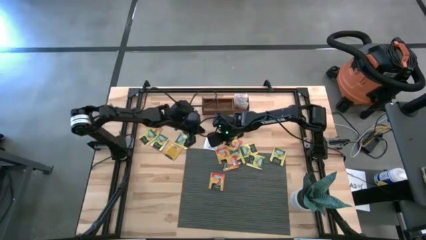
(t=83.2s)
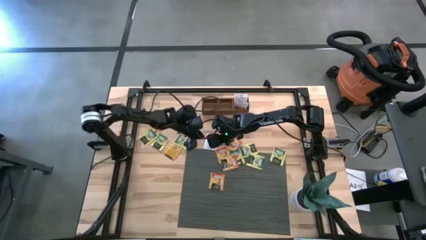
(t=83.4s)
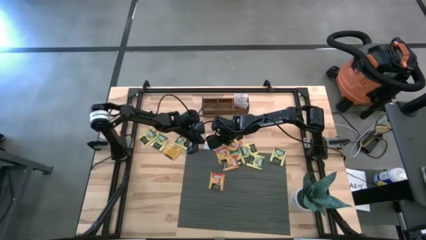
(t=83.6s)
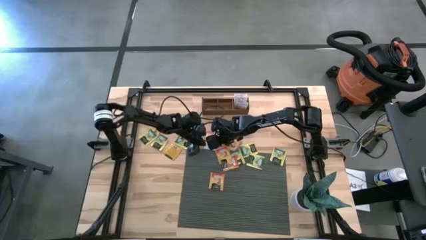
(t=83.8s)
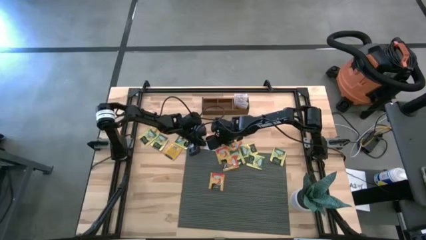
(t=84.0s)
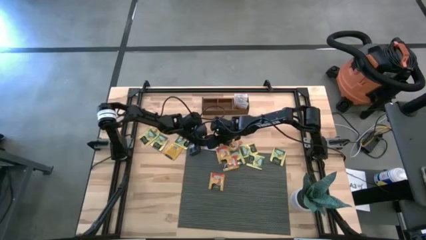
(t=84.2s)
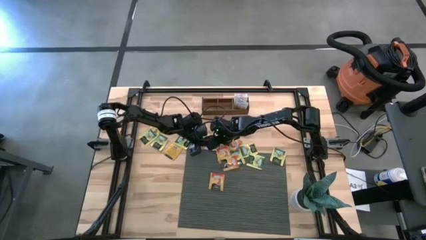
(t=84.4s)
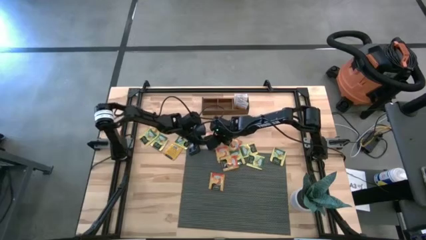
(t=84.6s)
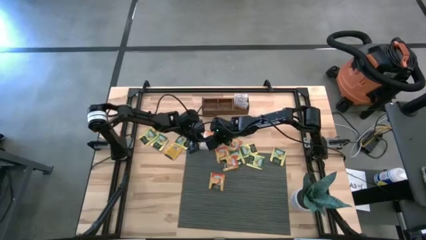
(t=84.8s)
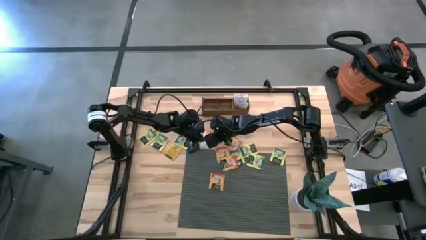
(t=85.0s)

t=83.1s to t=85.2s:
Task: Pick & Place Tea
Put the white tea bag into the right section of the wooden organizer

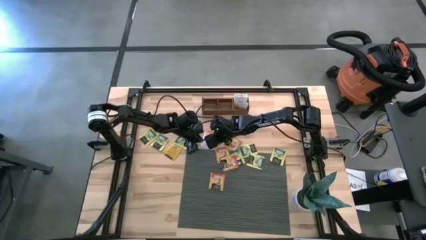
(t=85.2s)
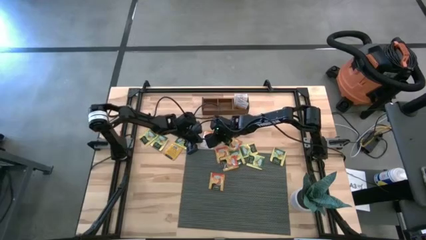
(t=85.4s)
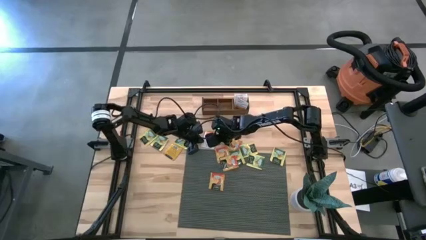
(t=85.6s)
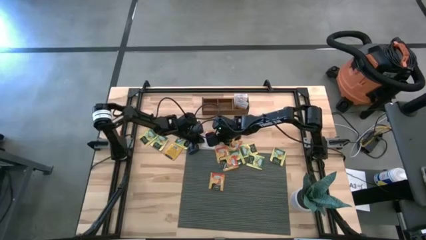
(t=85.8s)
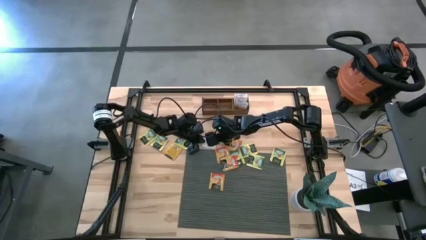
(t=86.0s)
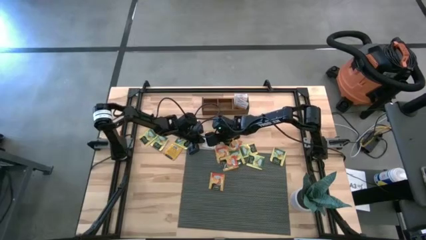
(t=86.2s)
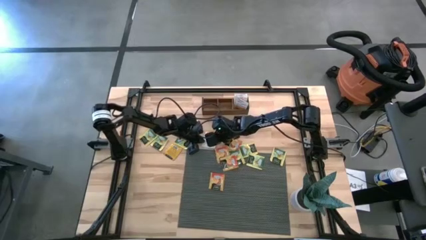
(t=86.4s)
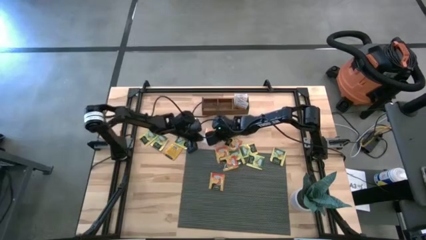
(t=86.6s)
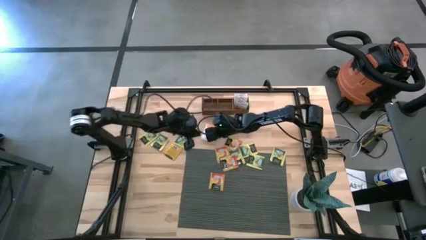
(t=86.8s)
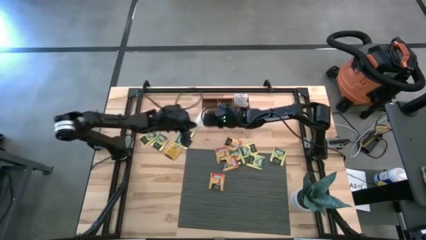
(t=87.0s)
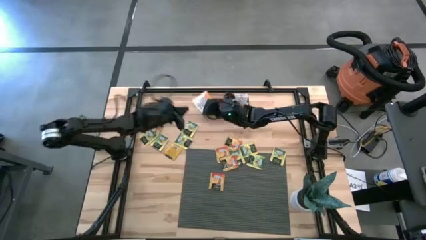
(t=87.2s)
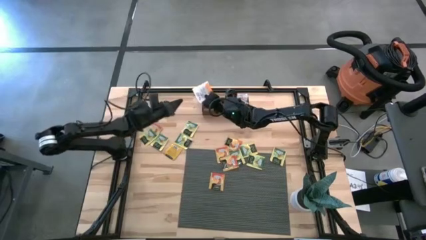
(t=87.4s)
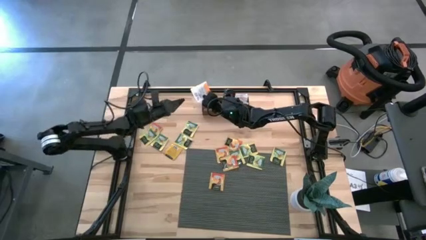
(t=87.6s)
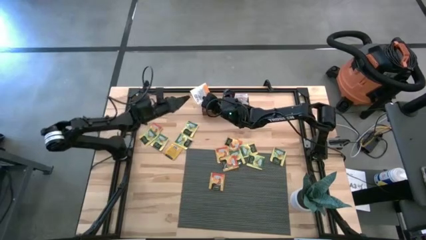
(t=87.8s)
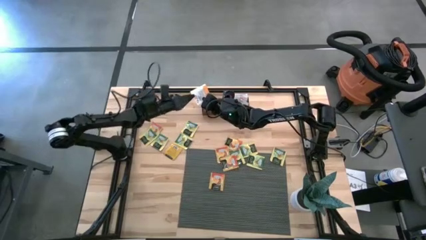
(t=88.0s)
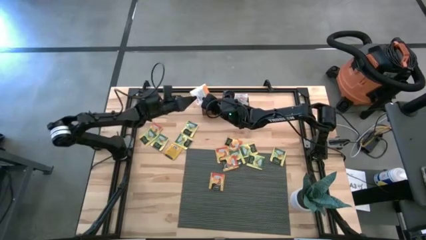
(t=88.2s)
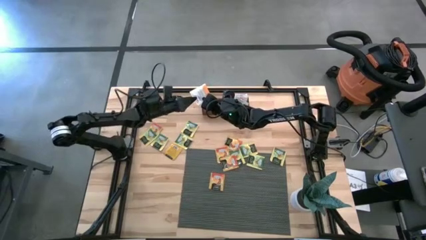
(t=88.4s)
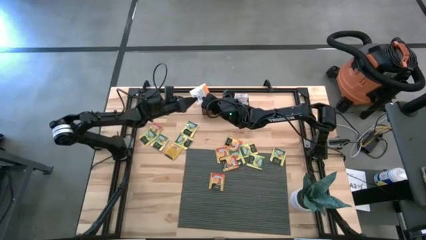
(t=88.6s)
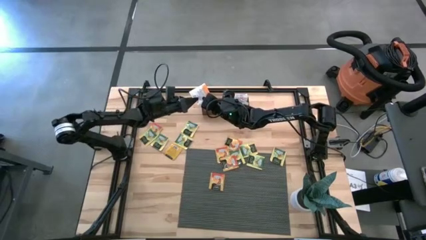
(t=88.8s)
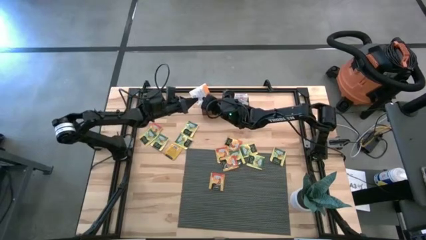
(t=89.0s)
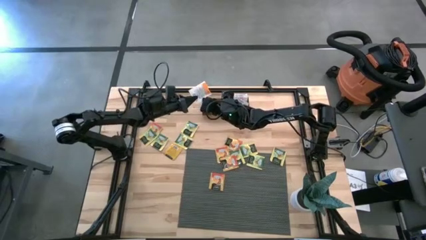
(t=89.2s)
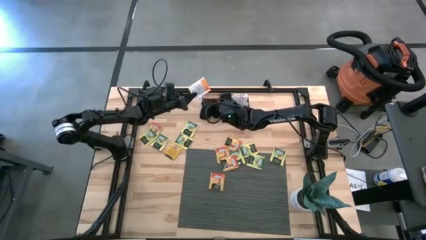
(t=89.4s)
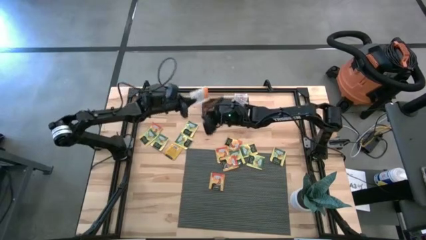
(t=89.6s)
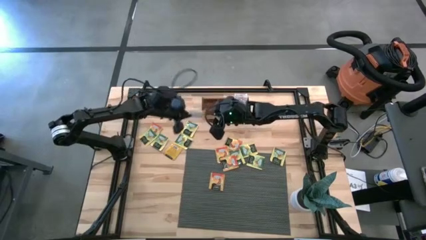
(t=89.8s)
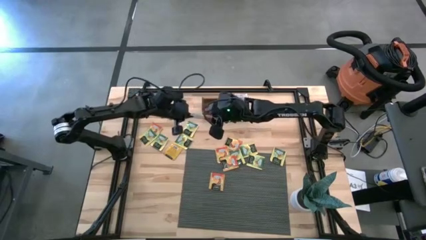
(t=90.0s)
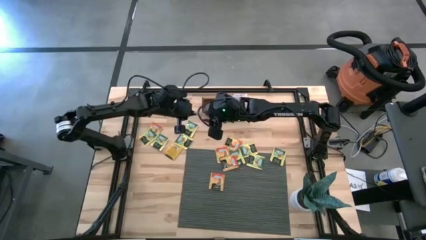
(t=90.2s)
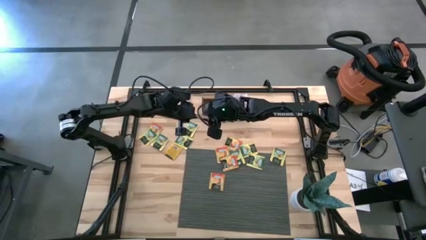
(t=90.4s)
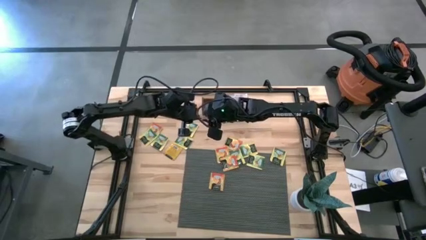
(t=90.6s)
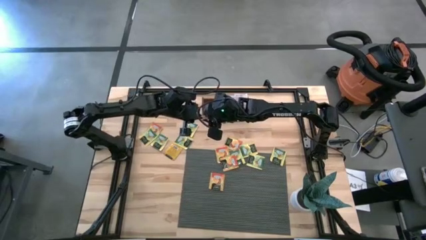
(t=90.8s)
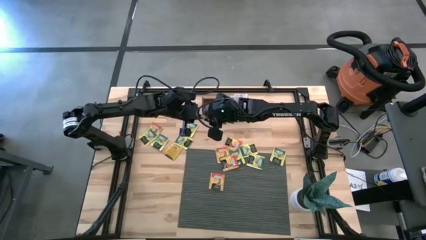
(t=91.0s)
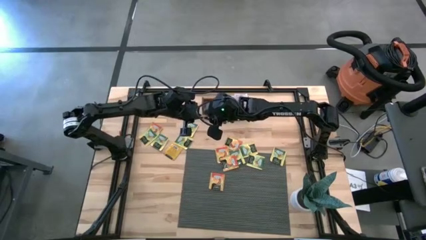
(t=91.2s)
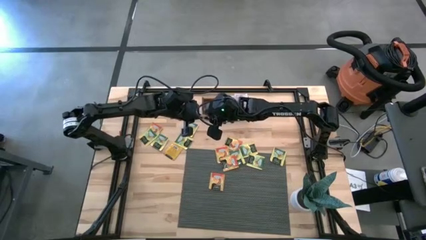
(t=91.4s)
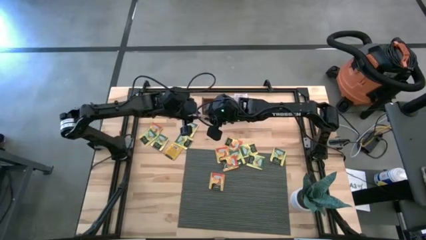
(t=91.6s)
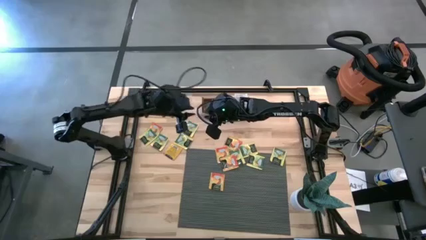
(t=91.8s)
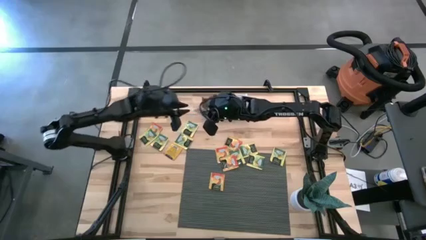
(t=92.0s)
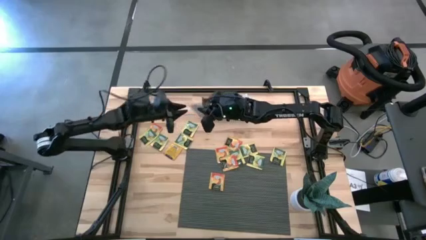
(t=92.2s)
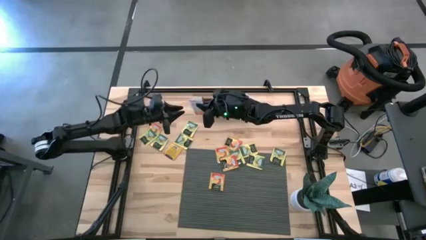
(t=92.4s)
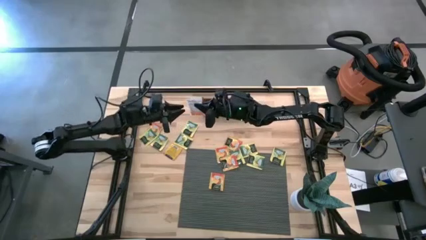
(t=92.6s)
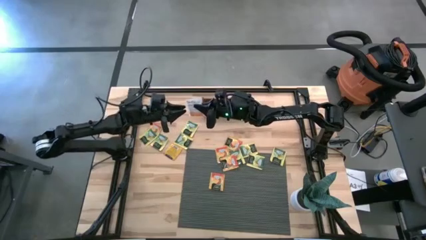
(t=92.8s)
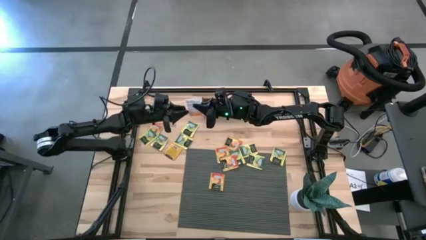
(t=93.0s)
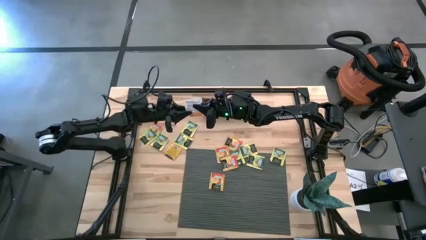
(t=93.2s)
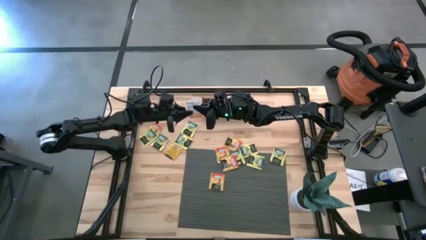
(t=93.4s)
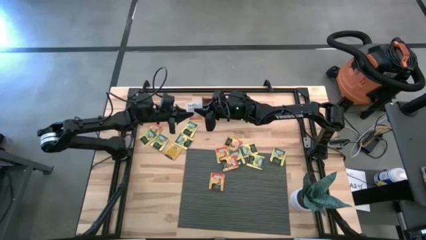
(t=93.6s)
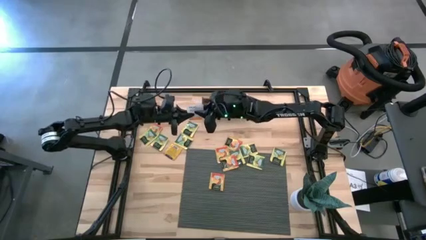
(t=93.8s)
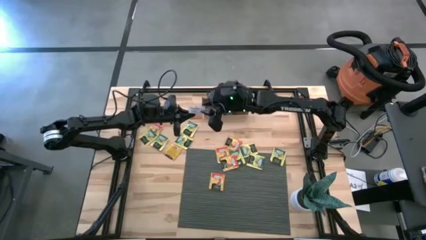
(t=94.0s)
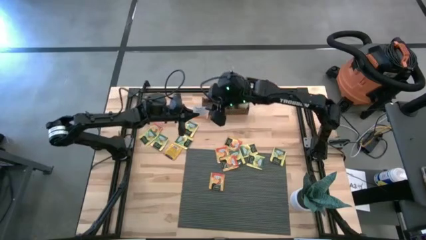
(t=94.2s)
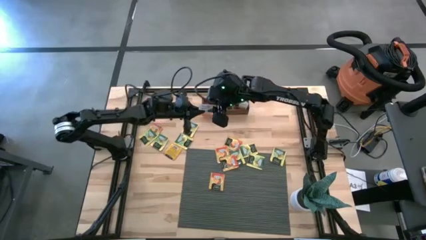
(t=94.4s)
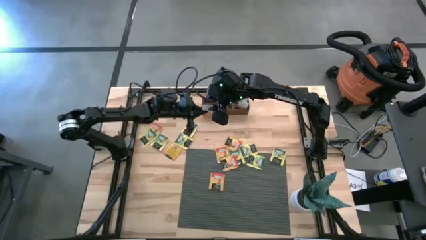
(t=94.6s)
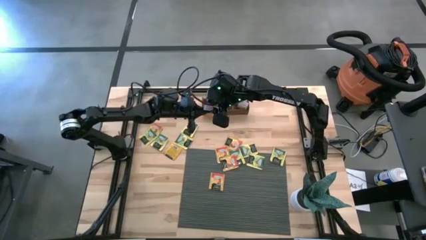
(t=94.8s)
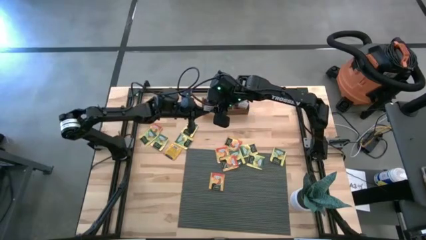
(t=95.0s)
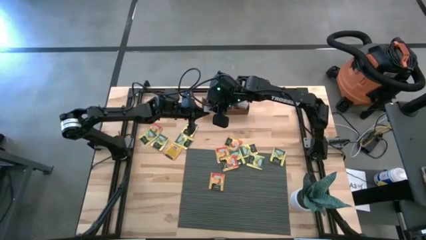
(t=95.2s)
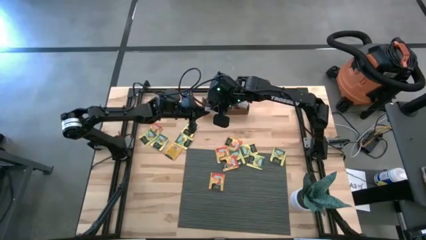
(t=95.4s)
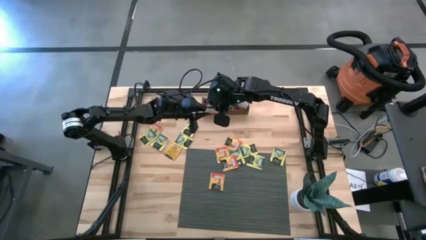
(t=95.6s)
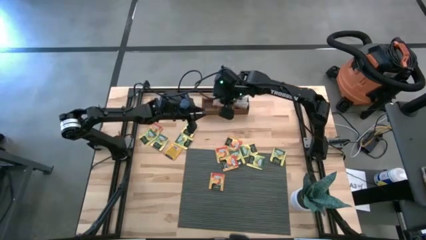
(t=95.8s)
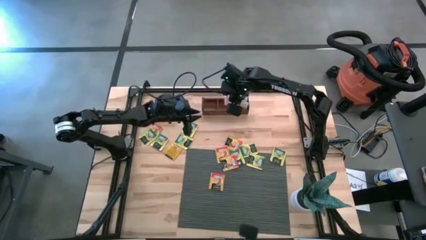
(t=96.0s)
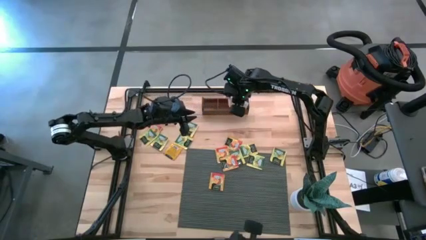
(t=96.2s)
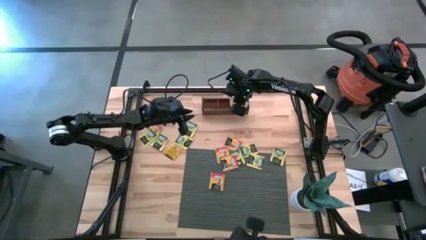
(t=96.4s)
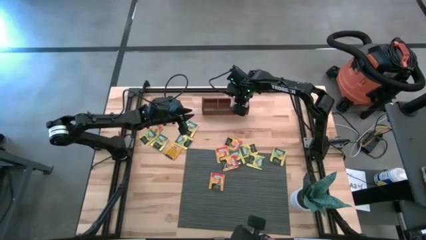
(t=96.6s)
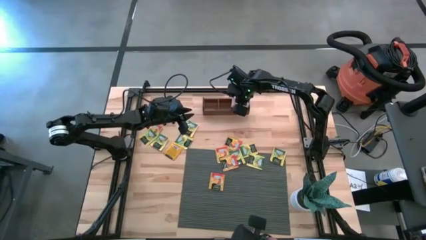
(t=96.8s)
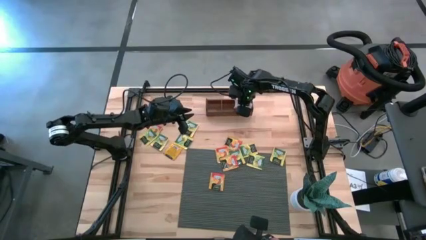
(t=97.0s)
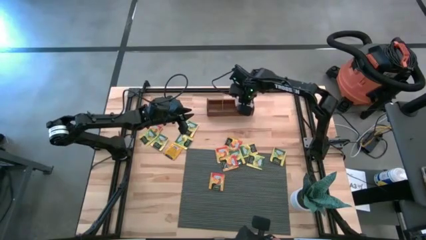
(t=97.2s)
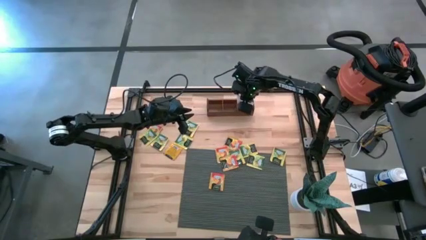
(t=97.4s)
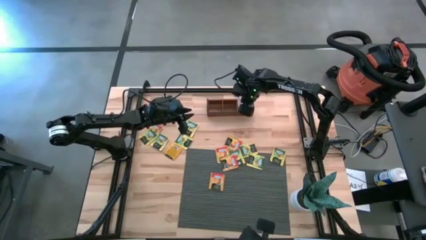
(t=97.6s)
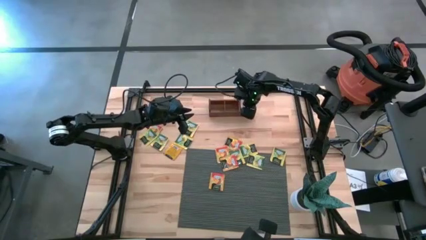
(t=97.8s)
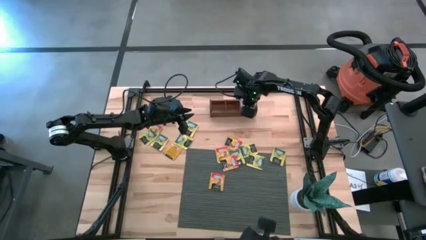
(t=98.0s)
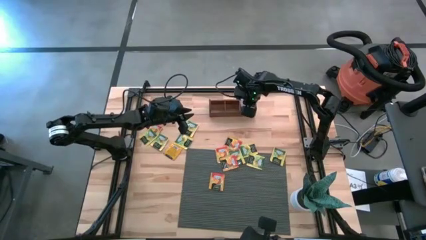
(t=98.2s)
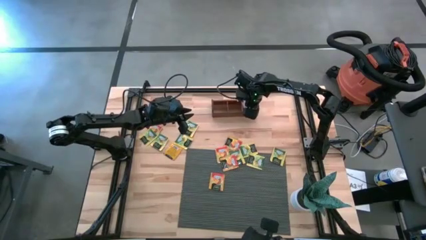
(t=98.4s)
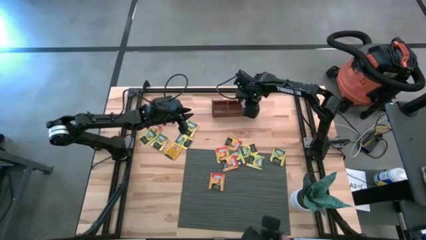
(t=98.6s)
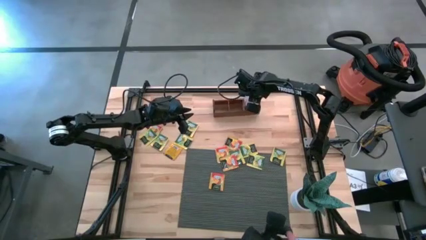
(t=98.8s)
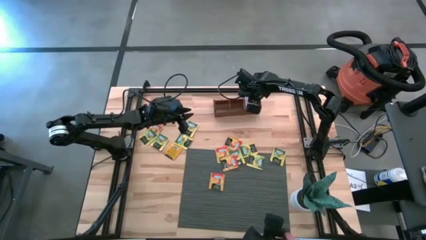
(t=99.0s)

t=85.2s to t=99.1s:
Put the white tea bag into the right section of the wooden organizer

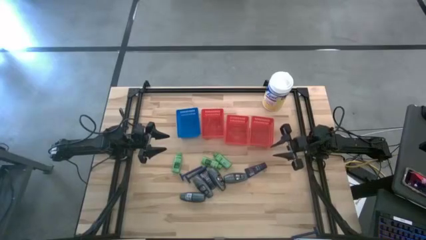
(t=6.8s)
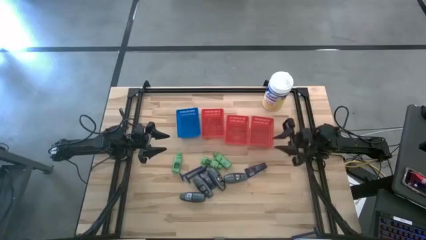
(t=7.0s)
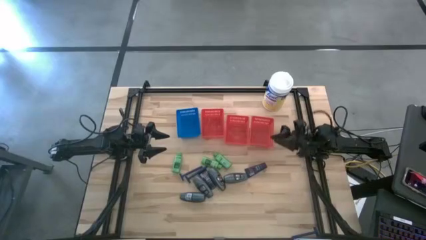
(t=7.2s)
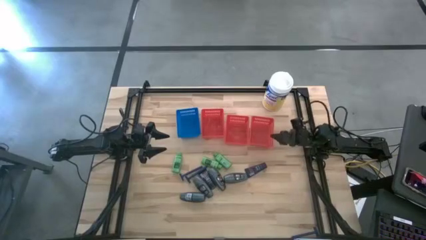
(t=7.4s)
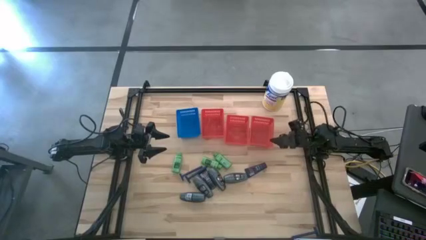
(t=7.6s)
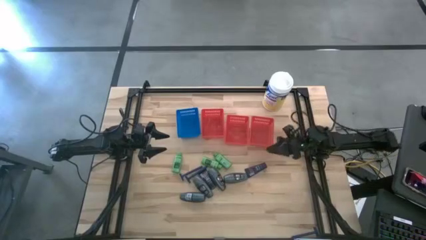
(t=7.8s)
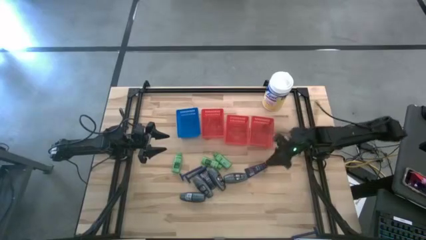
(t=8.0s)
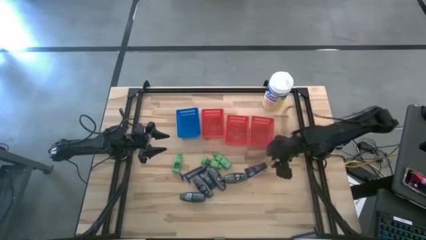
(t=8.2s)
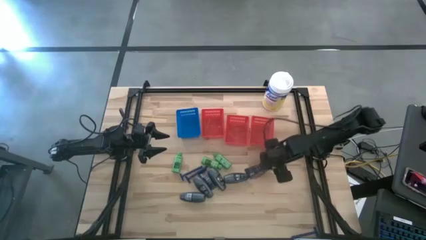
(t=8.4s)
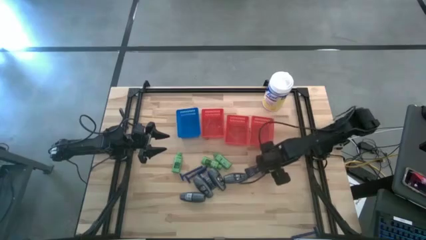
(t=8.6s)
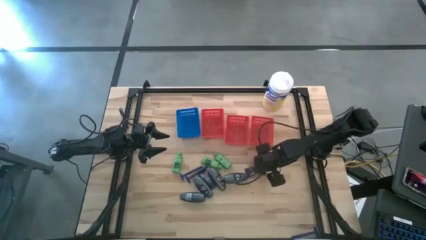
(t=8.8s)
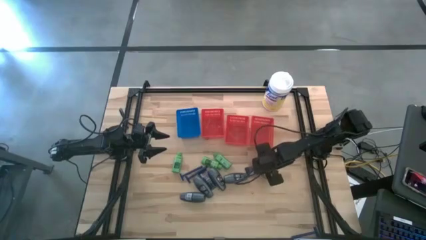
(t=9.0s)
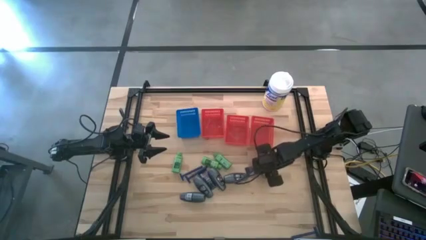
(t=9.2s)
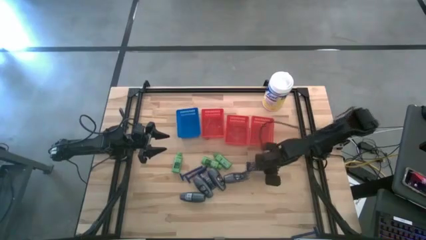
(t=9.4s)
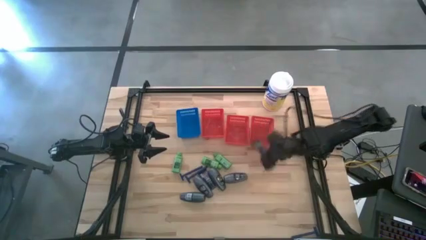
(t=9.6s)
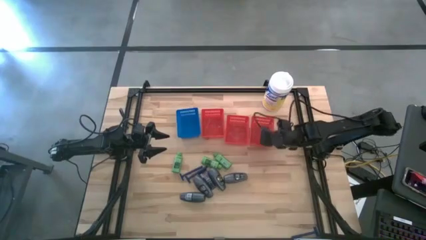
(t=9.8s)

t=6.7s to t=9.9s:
Task: Pick & Place Travel size toiletries
Put the dark blue shave cream into the right red bin
